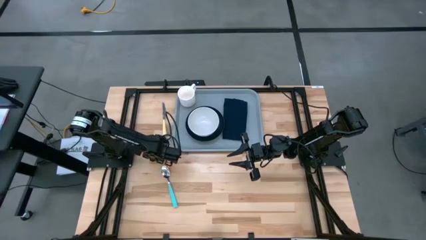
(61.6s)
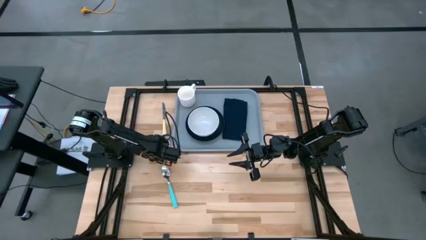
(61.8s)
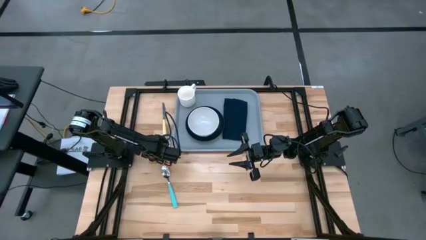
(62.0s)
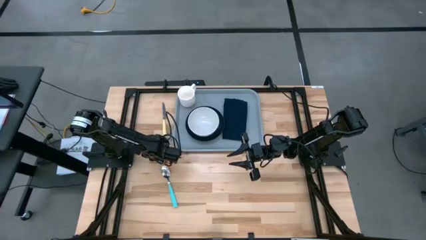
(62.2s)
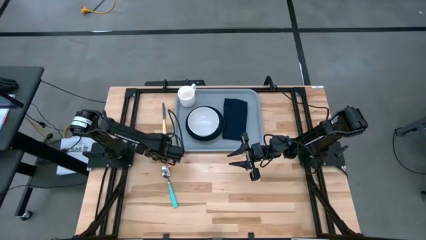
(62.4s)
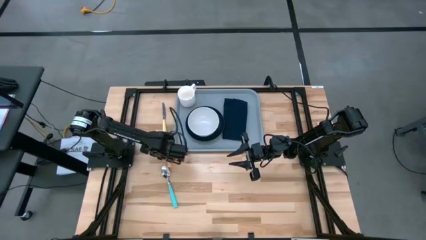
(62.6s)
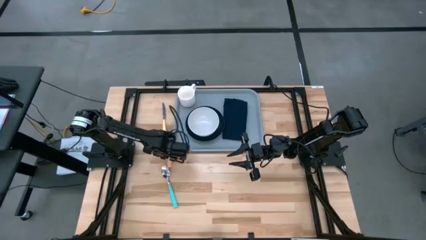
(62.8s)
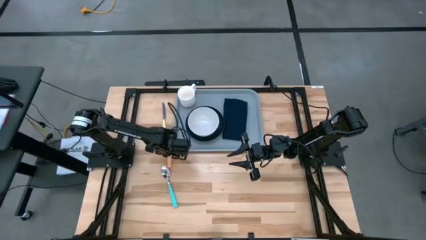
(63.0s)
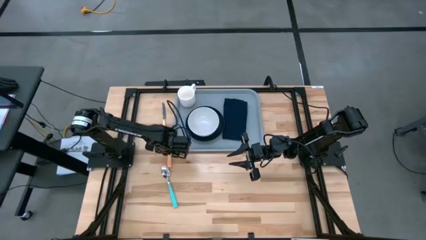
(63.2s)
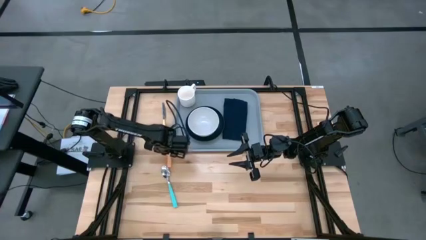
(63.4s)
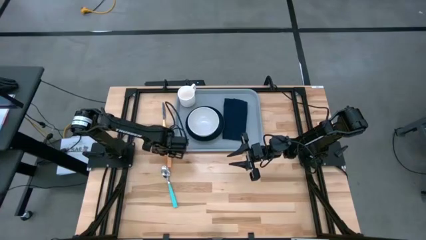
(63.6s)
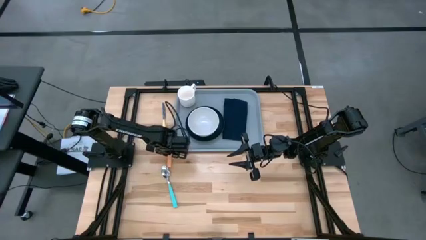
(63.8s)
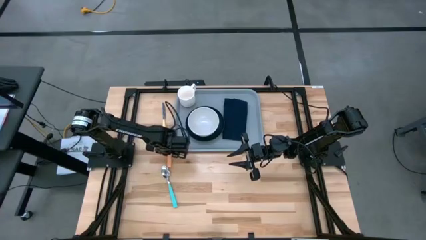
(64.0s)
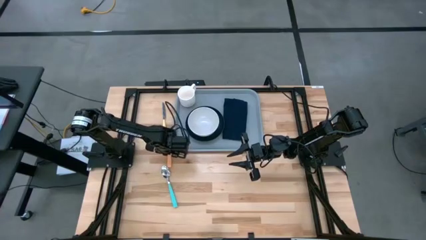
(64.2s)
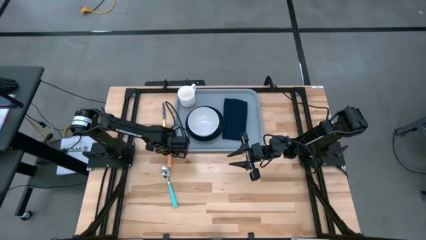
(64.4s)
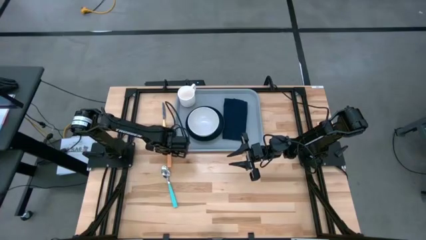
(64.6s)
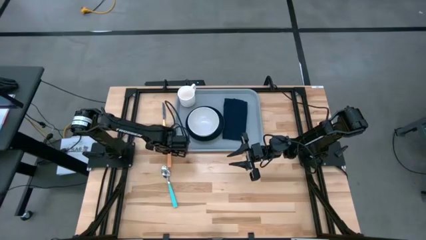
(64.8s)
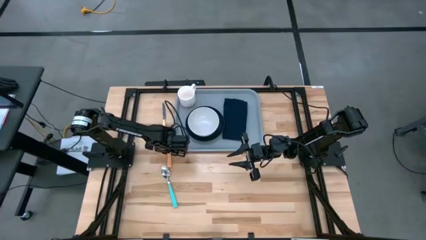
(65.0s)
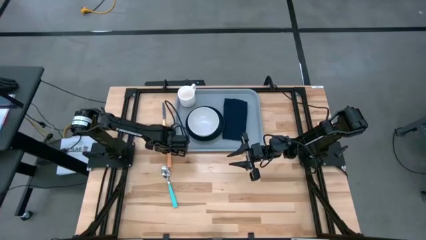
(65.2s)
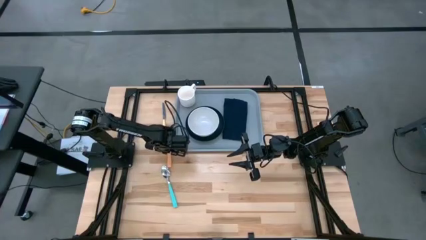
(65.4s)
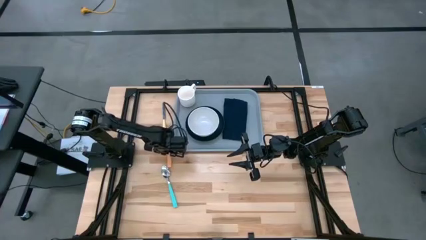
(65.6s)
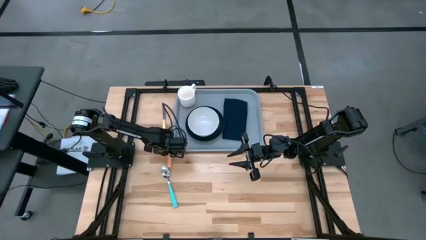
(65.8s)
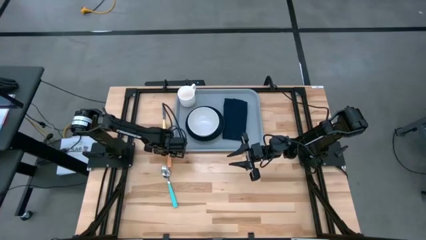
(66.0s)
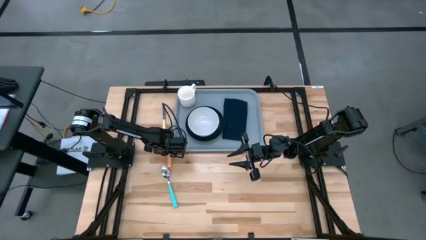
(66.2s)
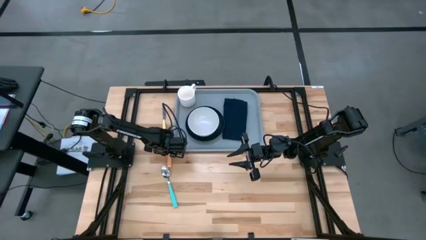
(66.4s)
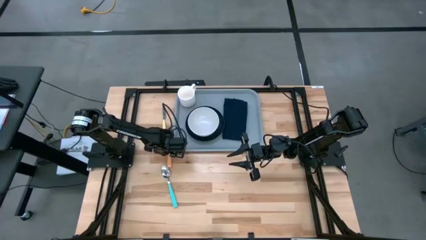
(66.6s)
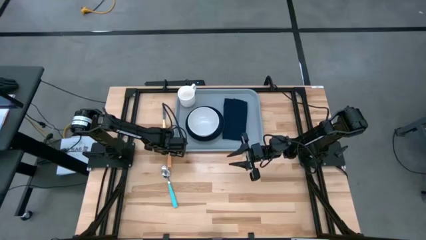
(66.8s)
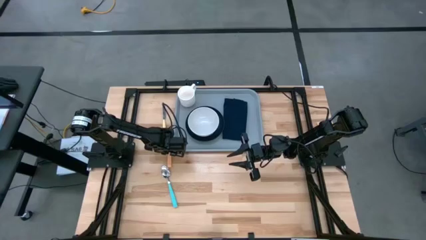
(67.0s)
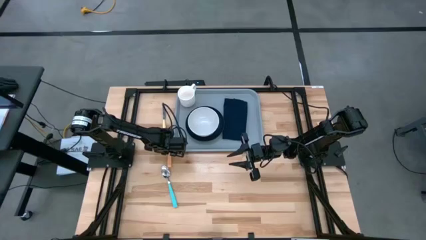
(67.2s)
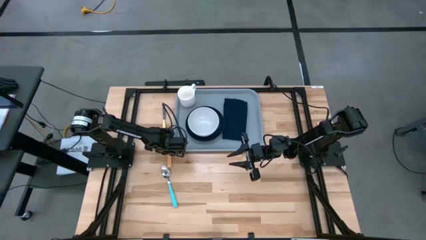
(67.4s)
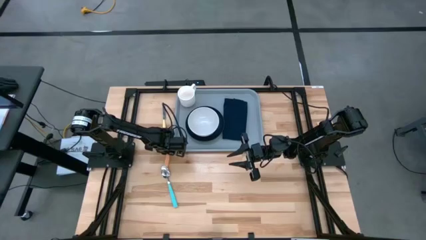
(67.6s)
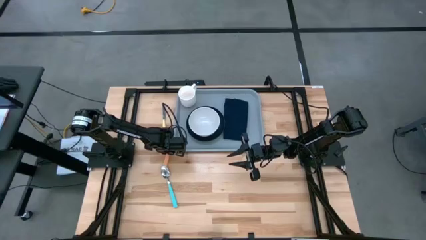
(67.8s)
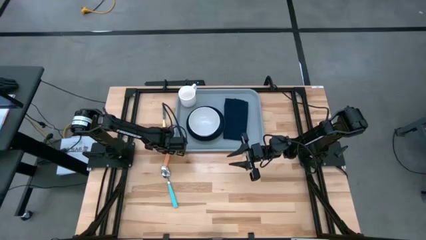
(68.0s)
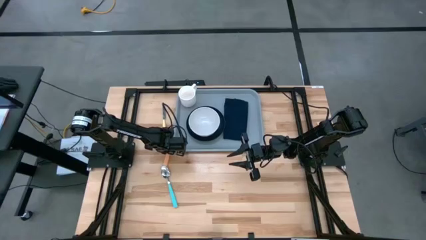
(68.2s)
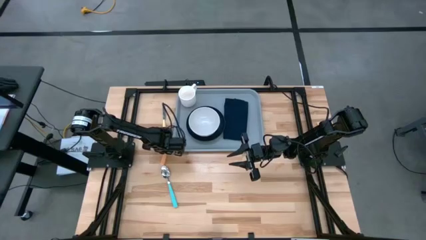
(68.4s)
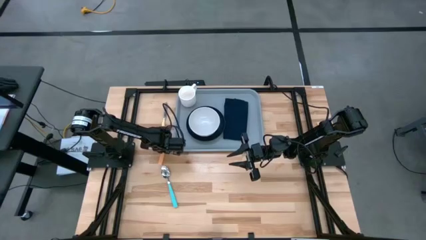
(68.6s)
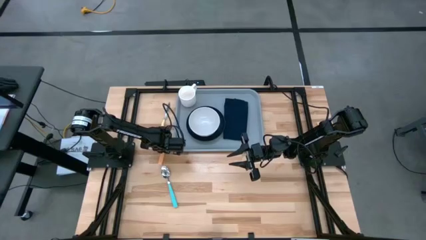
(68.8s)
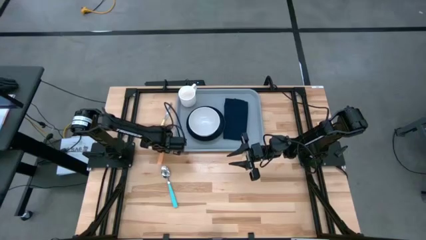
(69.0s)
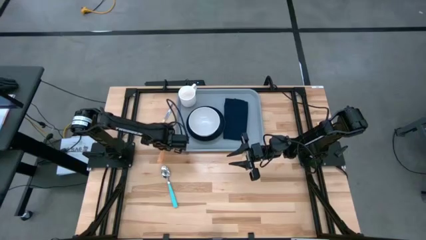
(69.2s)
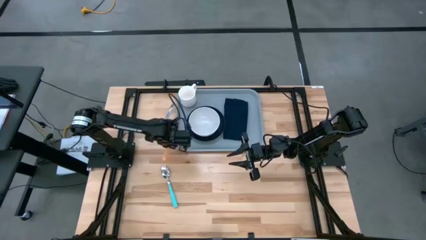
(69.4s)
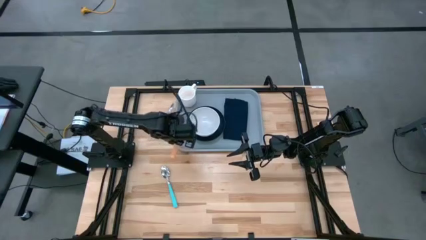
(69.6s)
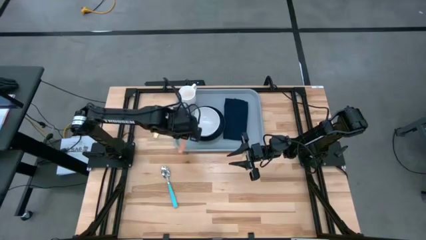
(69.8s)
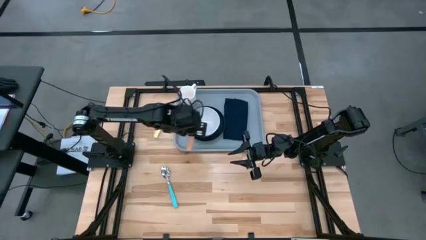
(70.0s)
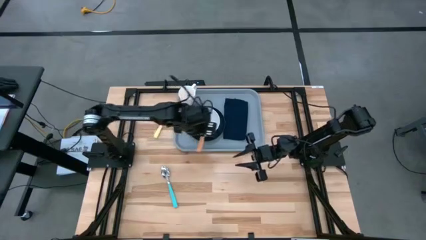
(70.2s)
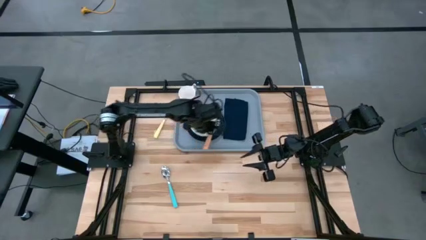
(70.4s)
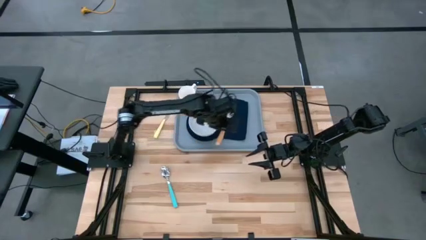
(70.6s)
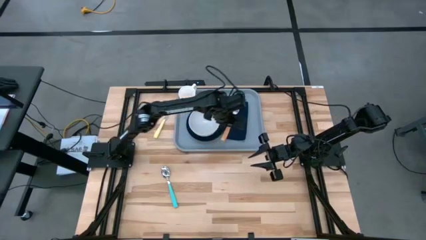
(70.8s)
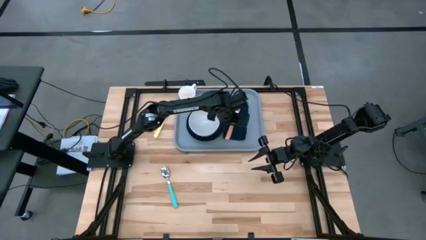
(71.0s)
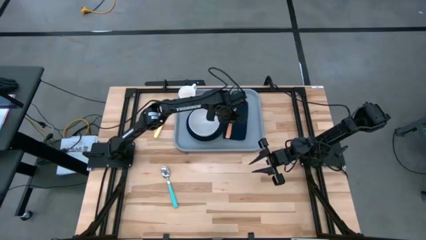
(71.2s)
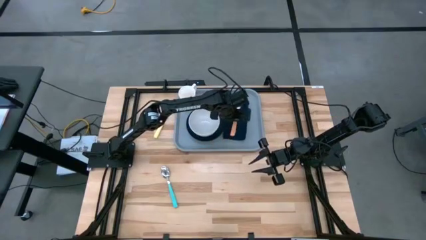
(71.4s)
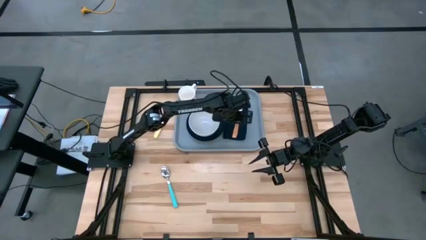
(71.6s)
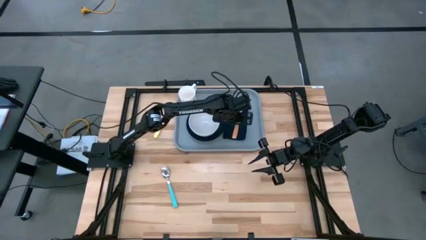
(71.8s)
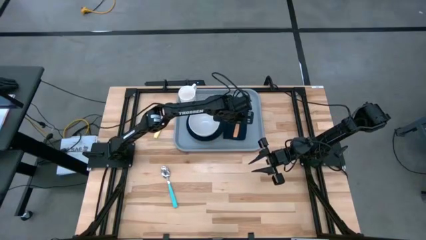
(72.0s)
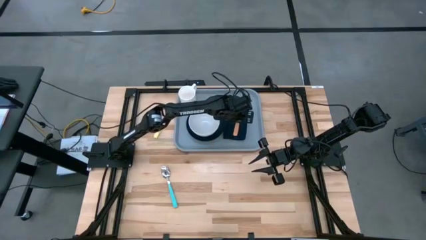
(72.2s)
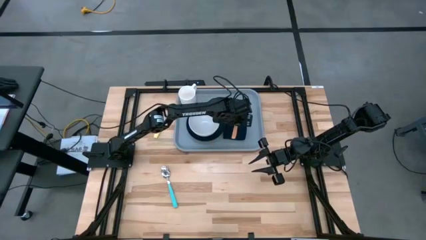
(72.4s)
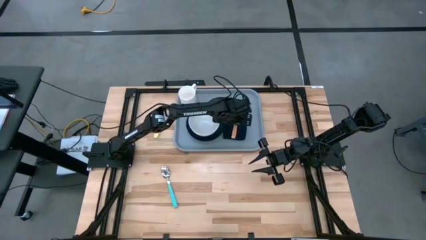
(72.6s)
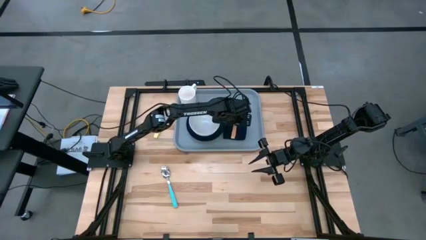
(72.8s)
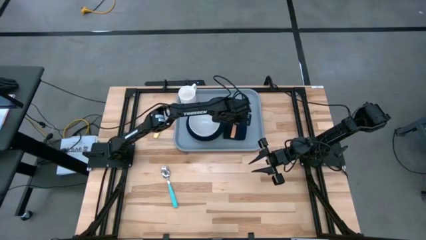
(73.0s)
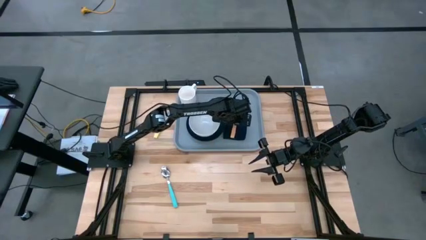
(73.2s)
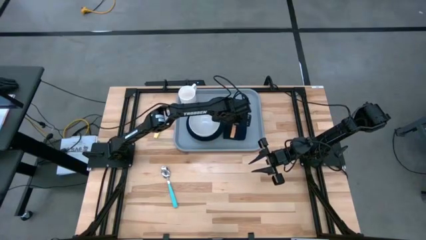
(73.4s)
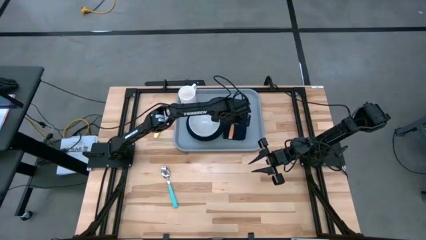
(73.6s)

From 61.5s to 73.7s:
Task: Set up tray
Put the orange fork on top of the blue napkin on the gray tray

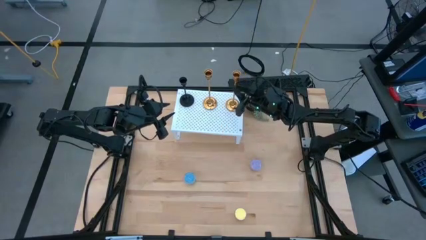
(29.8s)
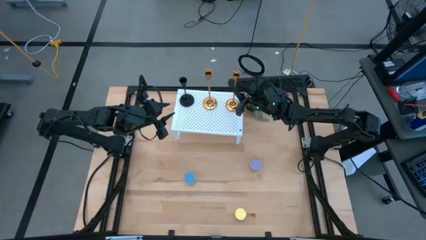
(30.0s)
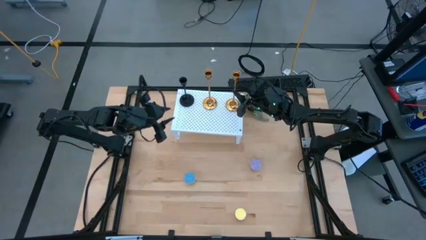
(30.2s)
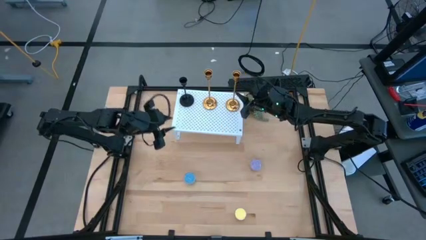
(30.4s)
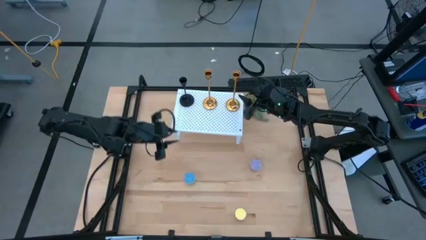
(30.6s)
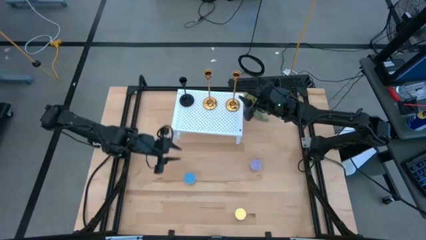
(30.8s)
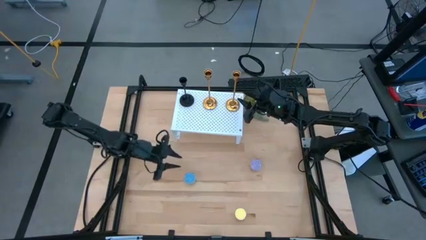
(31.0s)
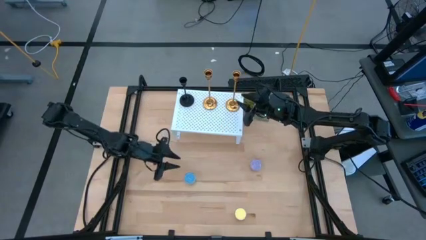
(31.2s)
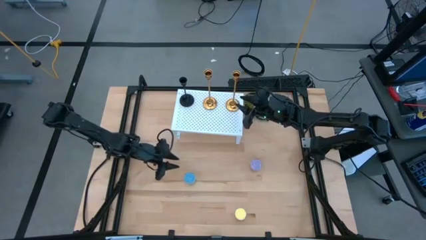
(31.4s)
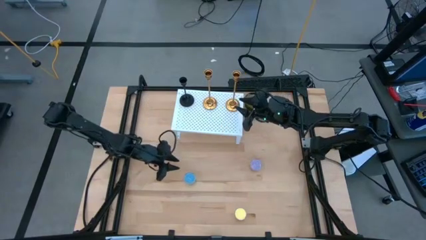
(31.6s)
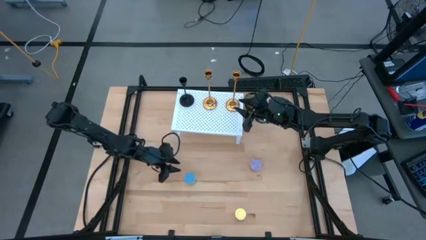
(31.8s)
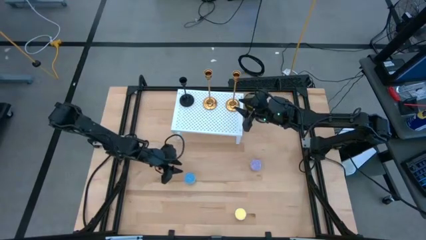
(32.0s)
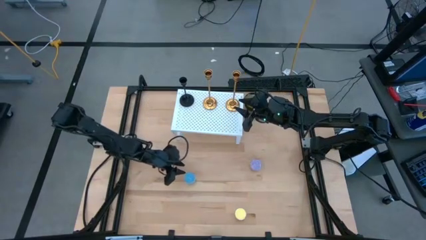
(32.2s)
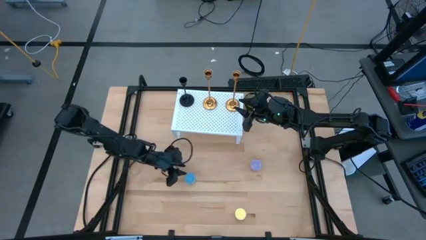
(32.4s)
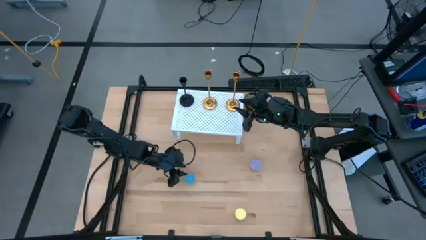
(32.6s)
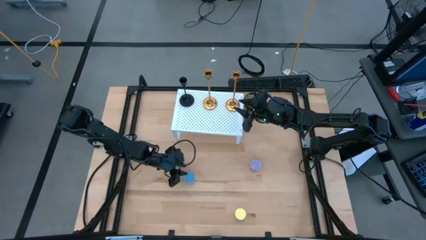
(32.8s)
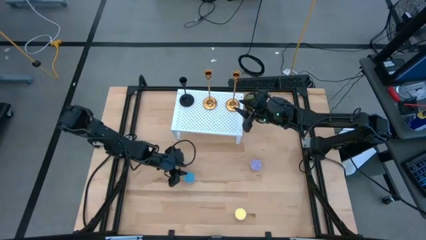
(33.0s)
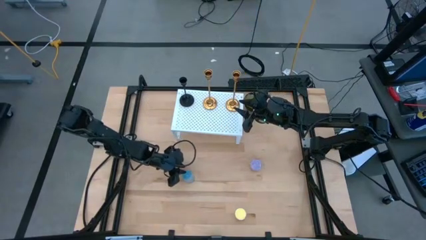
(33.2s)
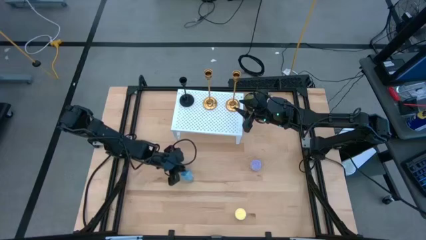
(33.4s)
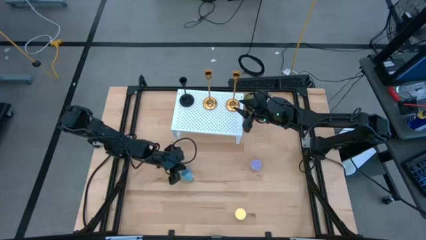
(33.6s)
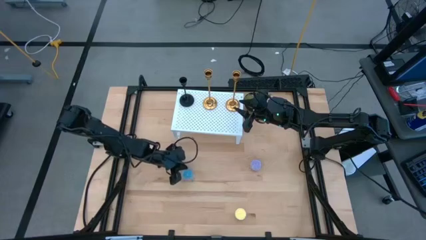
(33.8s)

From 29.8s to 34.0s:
Task: Pick & Place candle stick holders
Put the blue candle on the shelf
